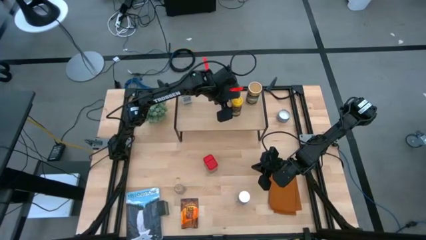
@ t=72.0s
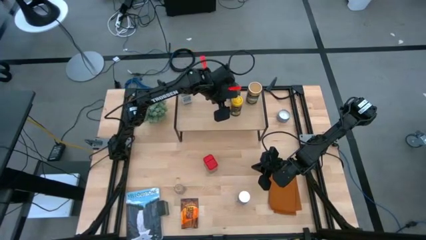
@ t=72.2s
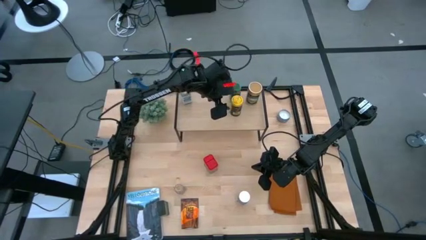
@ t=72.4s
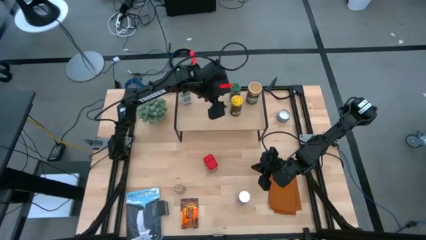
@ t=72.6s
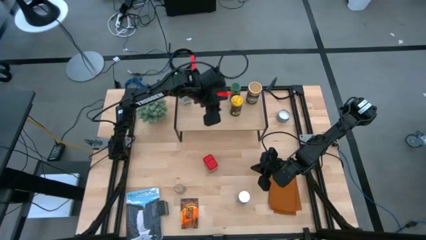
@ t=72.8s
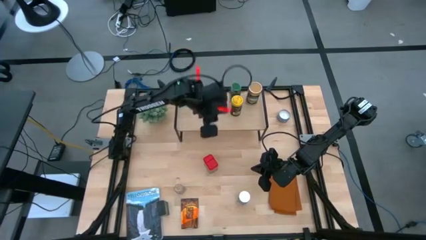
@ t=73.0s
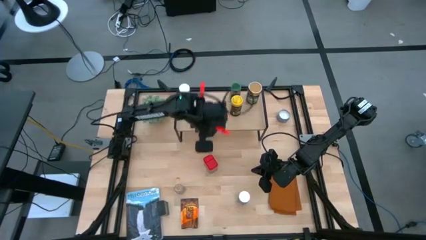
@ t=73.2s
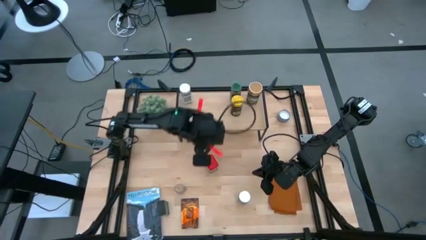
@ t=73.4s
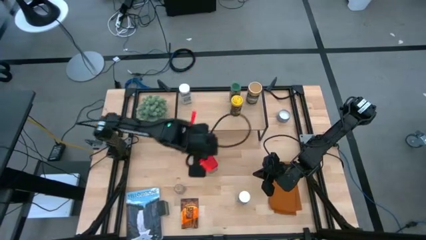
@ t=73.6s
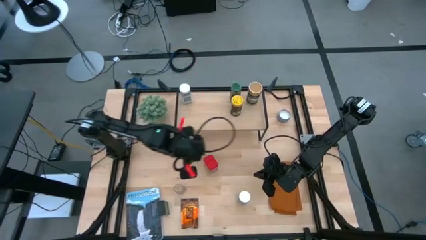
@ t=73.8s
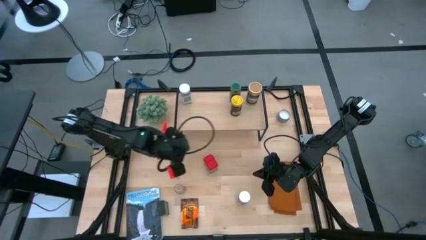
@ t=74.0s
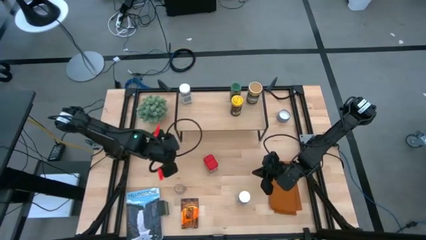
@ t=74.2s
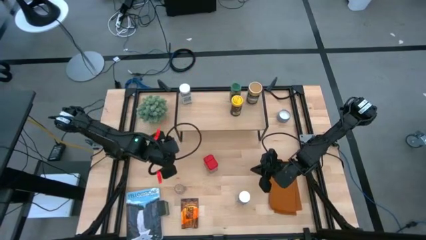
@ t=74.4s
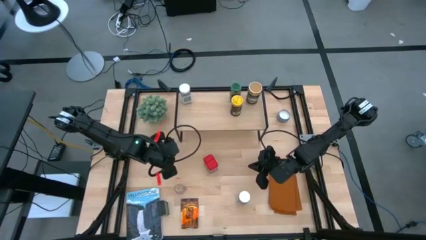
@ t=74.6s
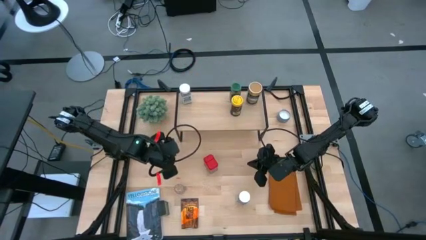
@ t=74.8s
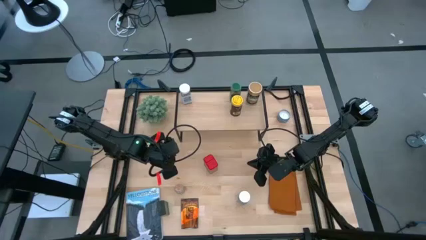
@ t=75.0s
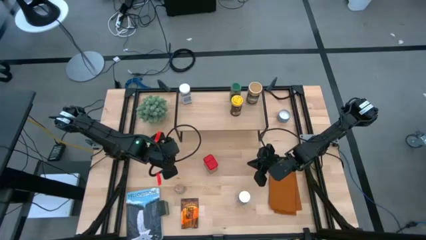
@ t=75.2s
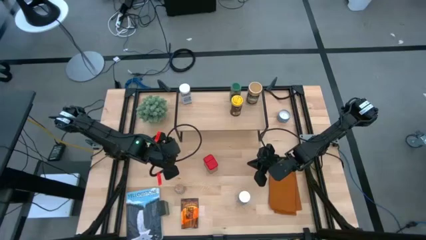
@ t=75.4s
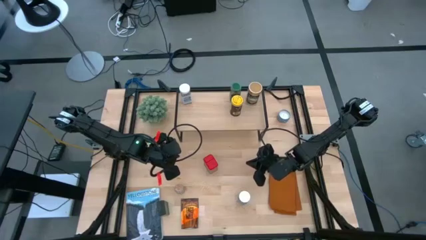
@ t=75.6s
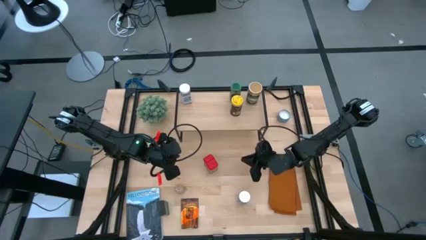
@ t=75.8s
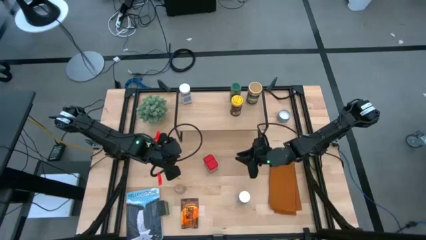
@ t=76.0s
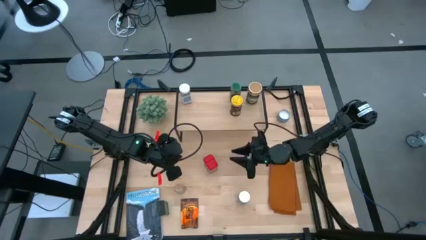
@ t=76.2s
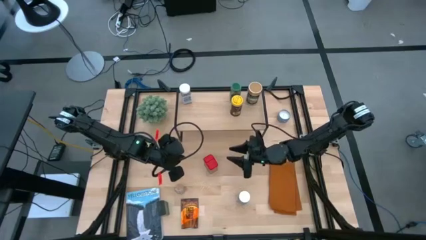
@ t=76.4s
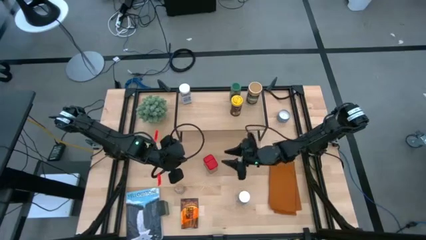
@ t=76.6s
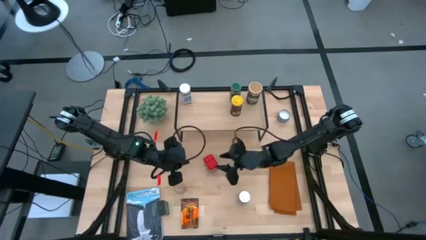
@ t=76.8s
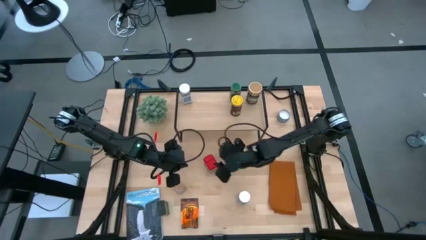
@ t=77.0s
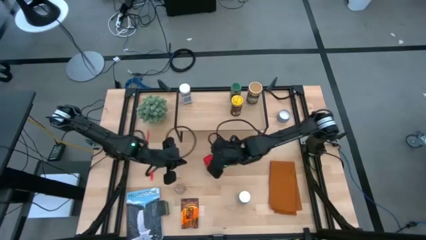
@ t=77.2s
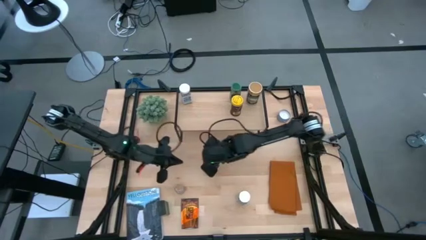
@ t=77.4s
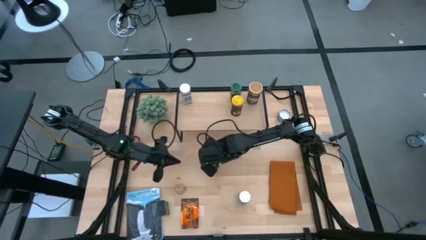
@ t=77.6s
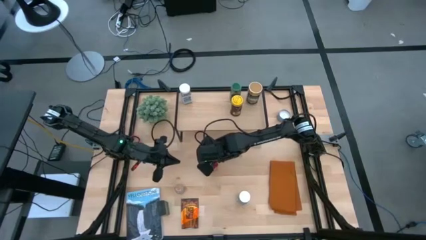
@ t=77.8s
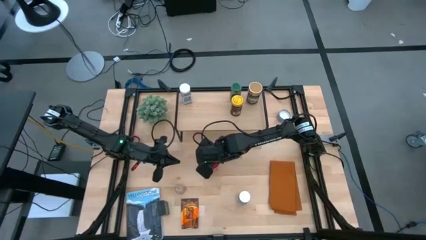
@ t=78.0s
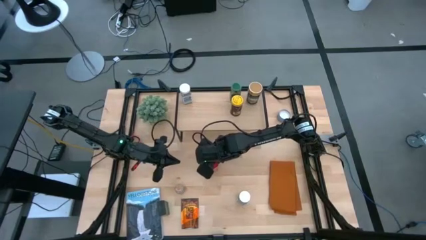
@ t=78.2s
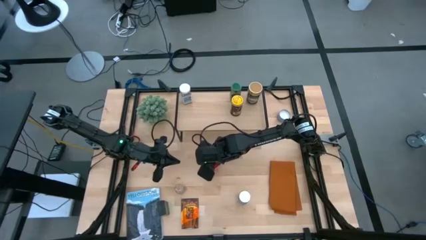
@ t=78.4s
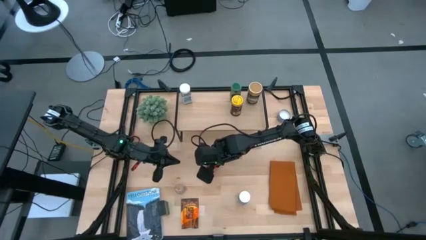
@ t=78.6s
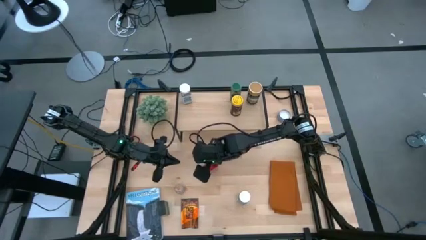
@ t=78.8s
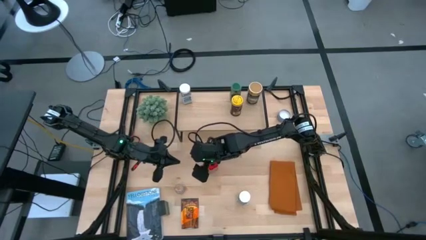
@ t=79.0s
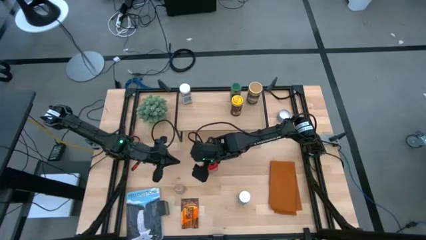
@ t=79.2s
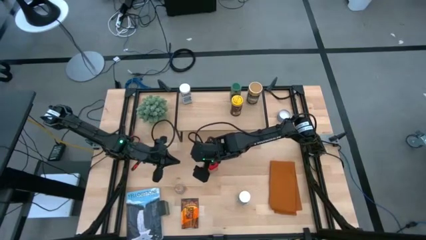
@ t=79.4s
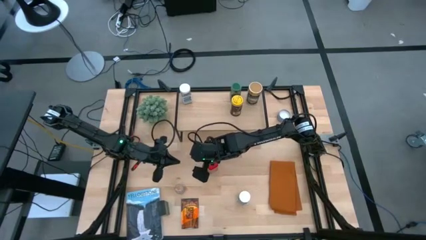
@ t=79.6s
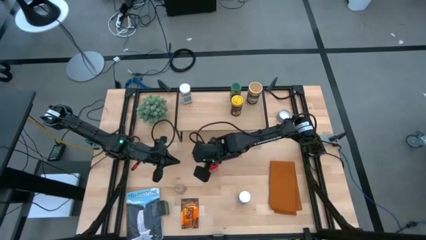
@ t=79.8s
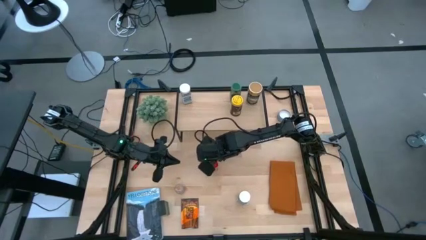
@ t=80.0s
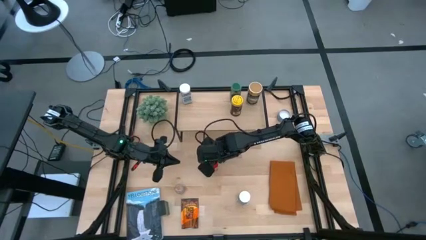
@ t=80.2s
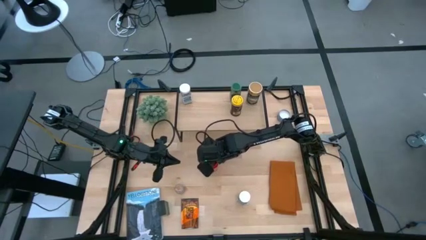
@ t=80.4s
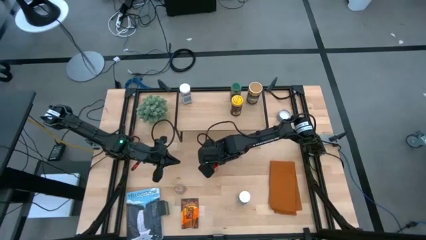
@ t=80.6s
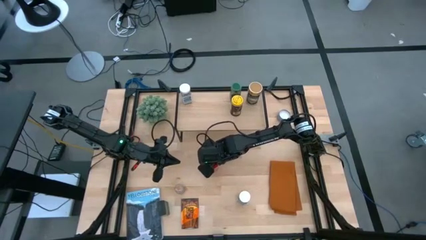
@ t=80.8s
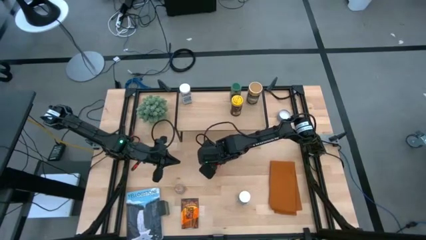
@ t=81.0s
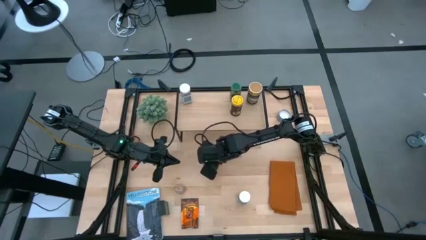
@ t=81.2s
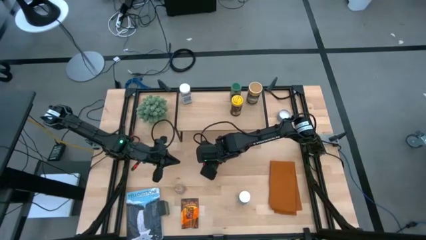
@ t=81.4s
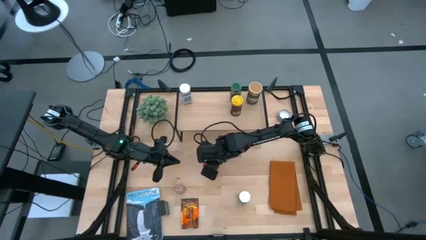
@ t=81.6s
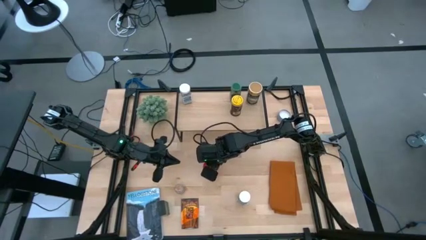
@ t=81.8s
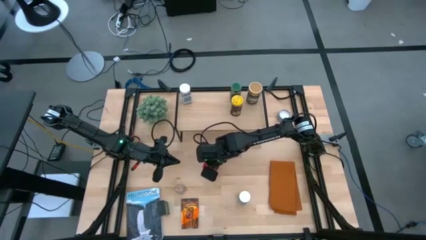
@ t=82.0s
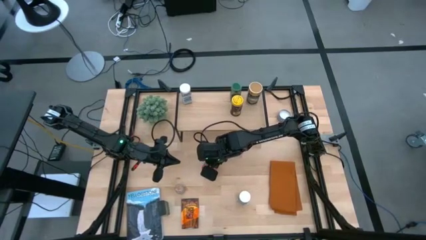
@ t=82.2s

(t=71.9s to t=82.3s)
Task: Shelf spices
Put the red seasoning can onto the shelf

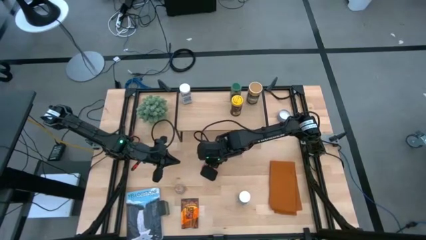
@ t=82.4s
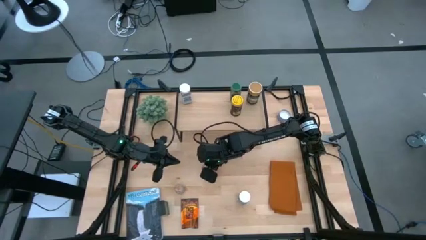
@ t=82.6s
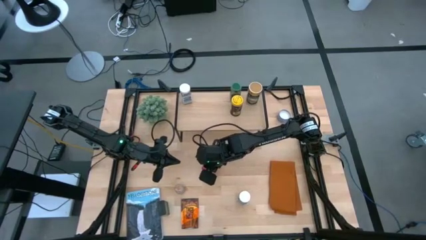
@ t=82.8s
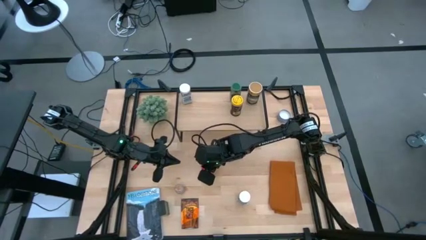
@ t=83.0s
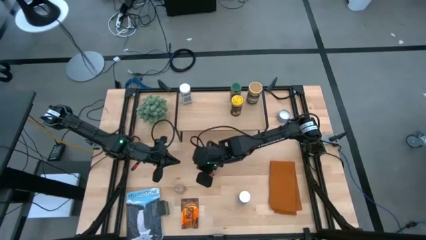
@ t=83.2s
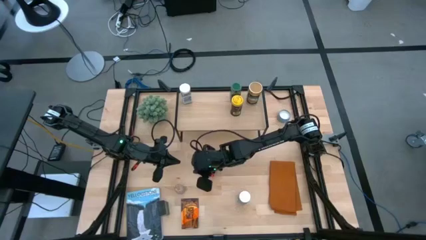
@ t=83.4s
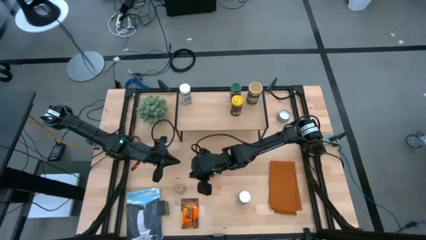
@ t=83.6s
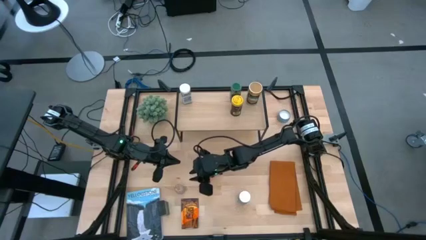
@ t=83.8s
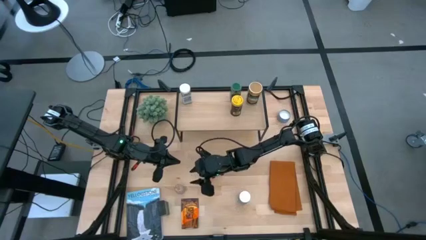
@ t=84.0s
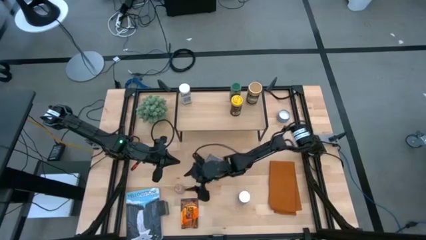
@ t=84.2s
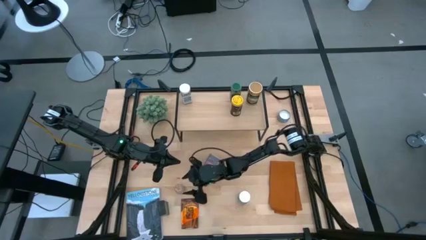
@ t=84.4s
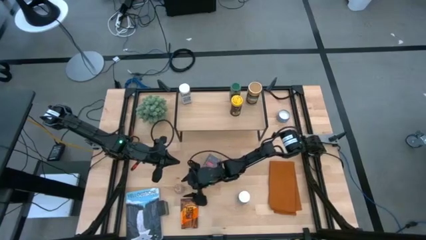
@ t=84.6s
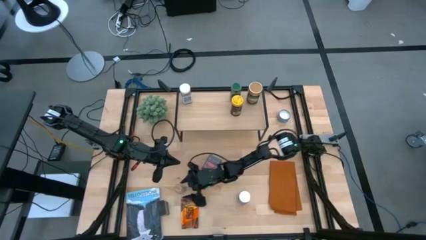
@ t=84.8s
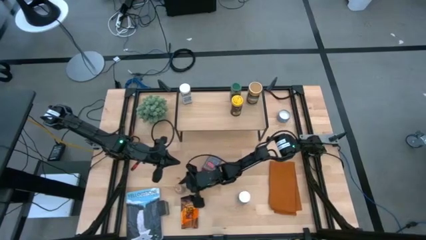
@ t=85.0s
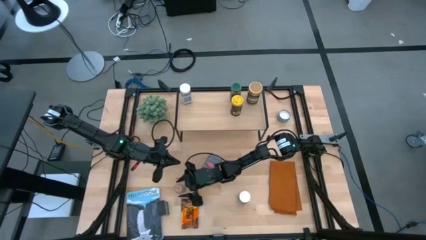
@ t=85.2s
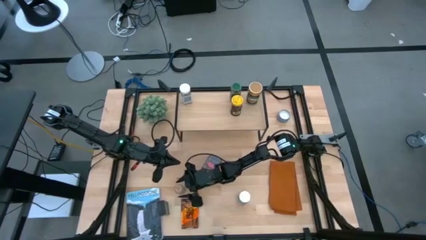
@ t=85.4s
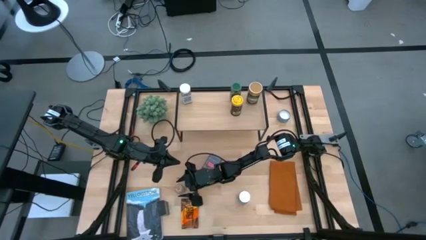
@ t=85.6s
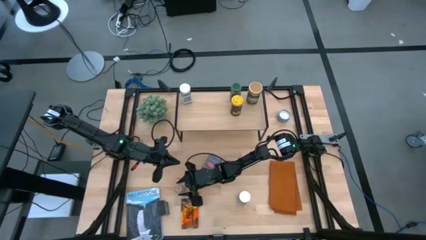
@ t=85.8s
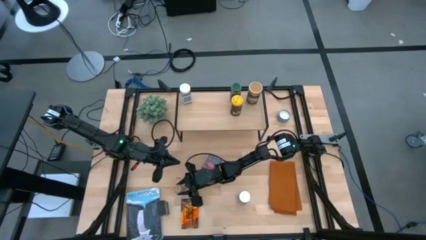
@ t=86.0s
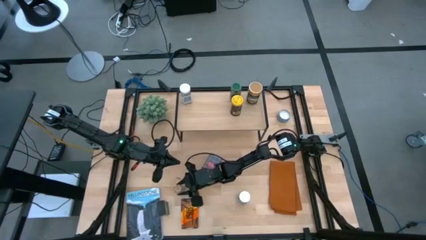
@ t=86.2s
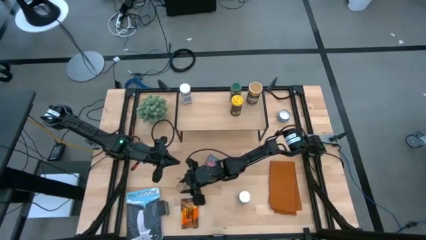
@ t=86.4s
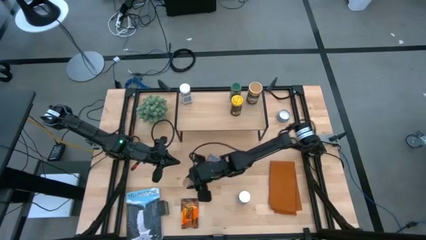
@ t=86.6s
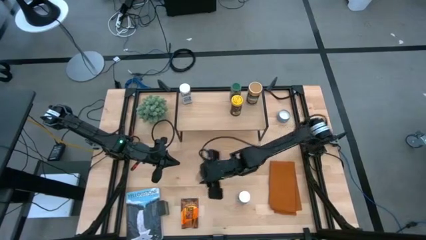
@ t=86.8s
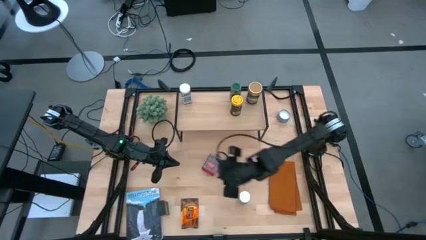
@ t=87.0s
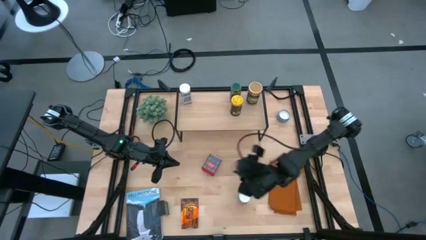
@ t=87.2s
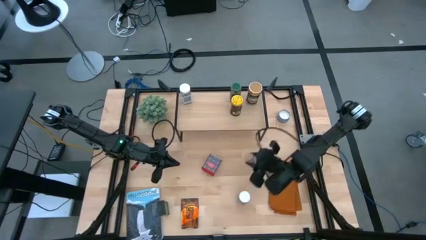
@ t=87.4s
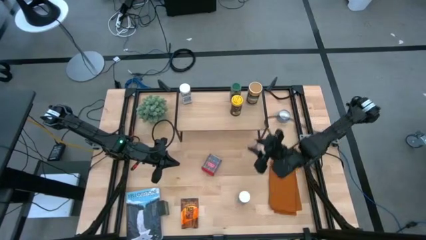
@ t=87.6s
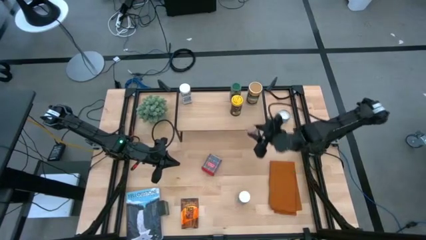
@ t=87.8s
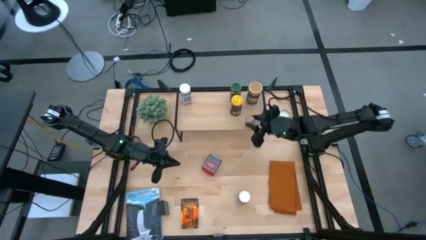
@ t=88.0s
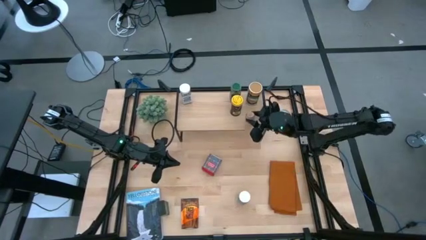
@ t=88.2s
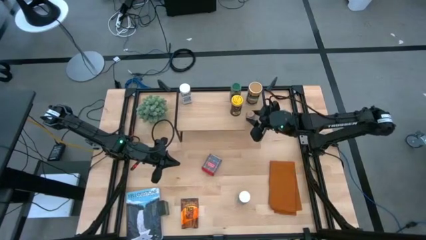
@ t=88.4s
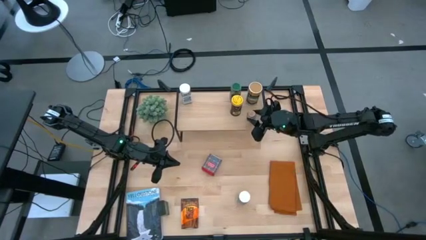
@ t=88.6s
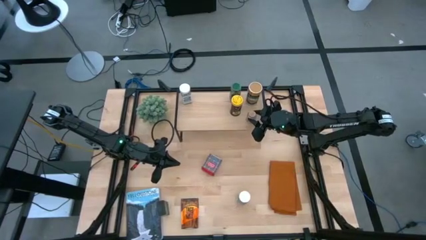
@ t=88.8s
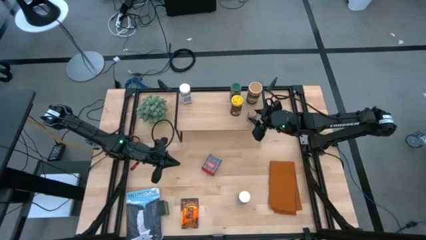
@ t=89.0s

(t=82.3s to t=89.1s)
Put the brown seasoning bottle onto the shelf
